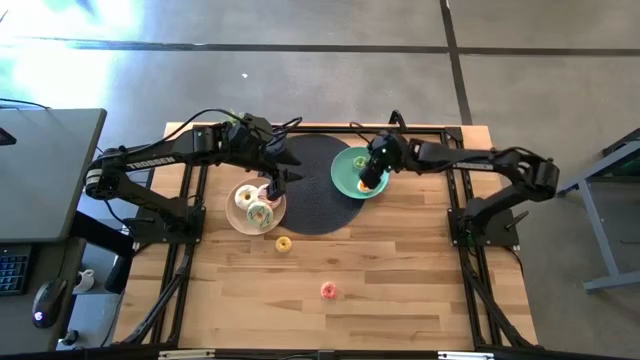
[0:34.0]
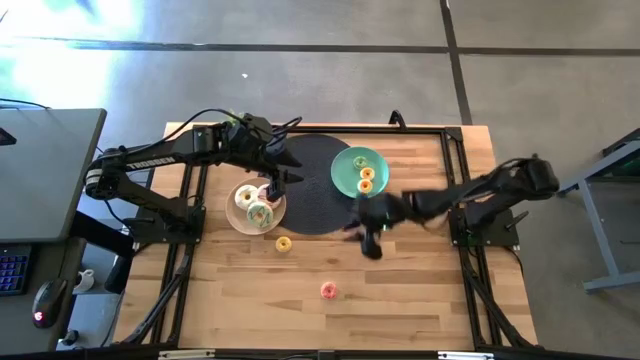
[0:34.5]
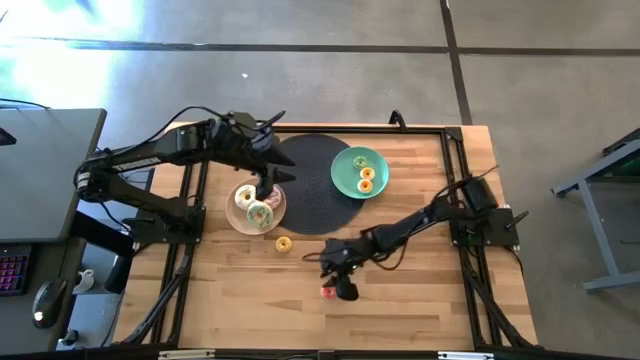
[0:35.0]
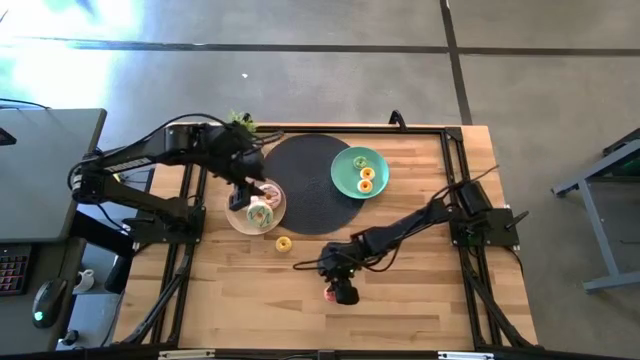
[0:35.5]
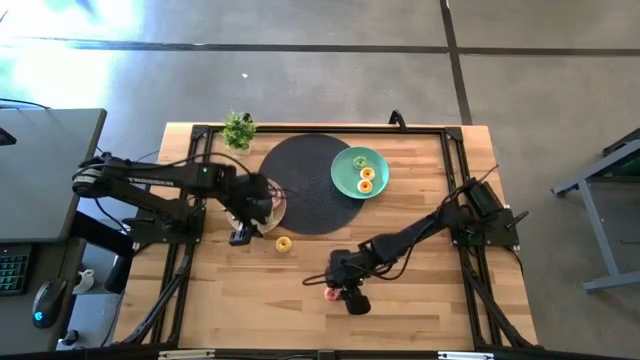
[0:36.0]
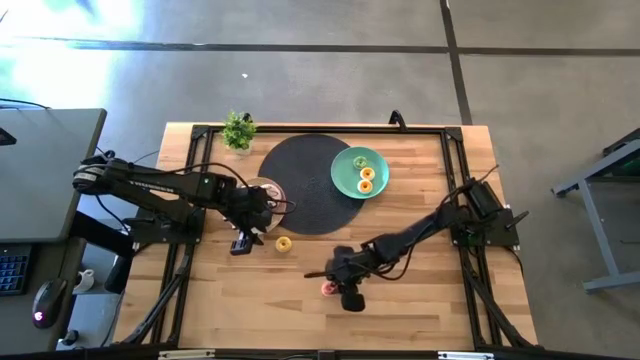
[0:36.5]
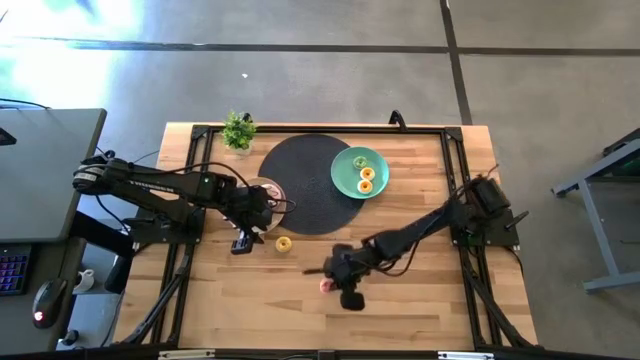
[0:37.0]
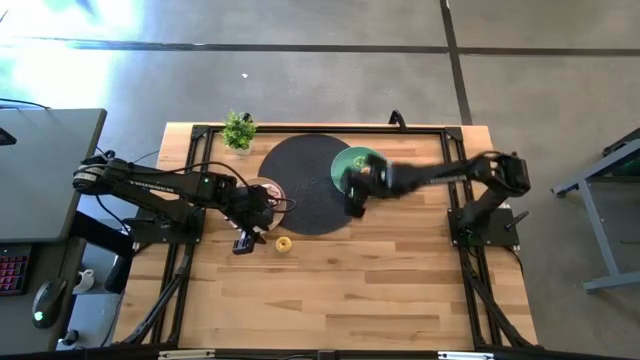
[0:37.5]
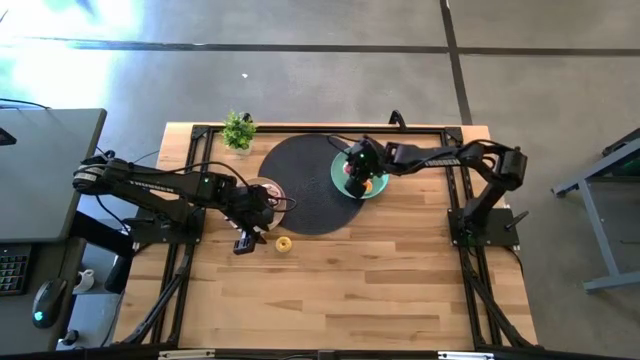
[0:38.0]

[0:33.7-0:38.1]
Task: Pick & Place donuts
Put the small pink donut on the green plate

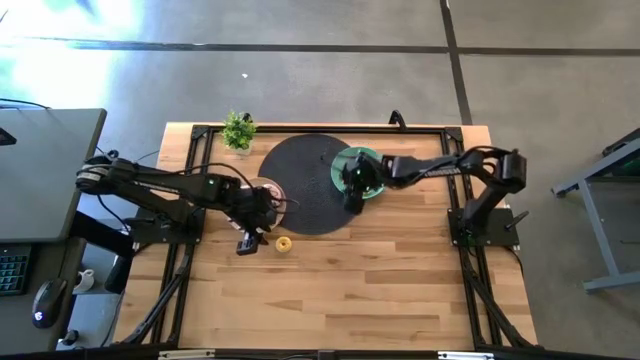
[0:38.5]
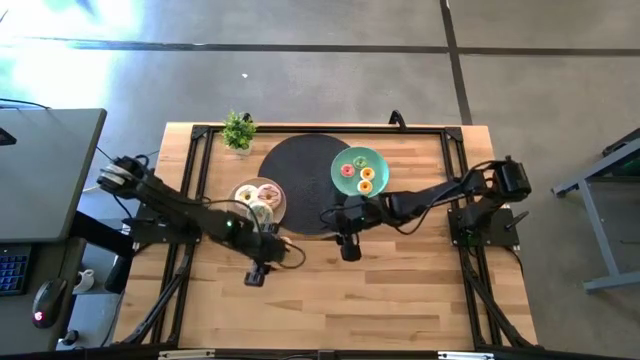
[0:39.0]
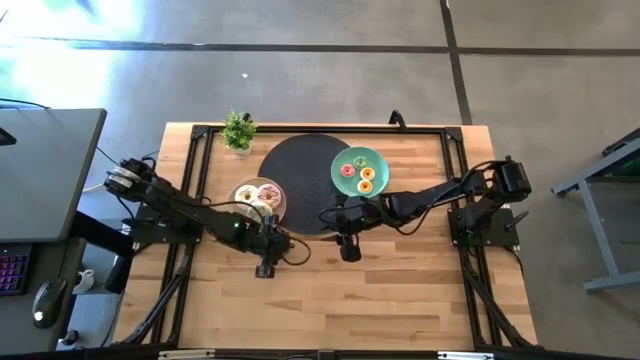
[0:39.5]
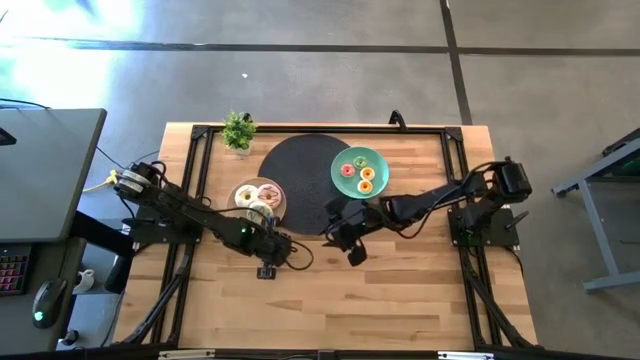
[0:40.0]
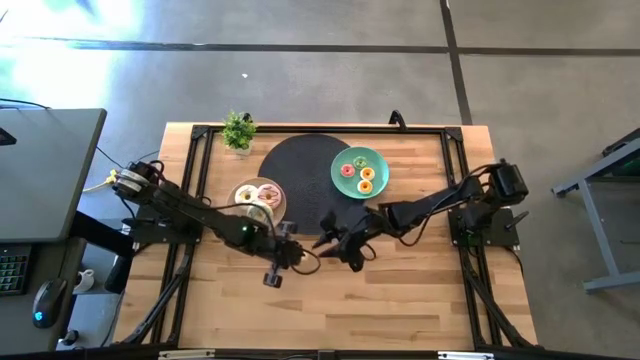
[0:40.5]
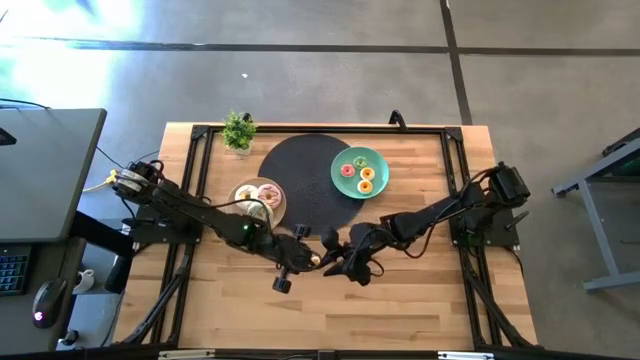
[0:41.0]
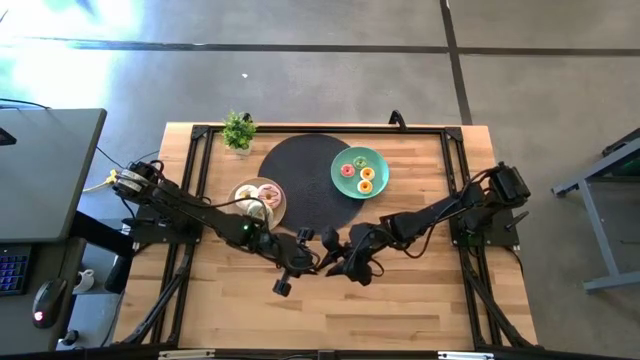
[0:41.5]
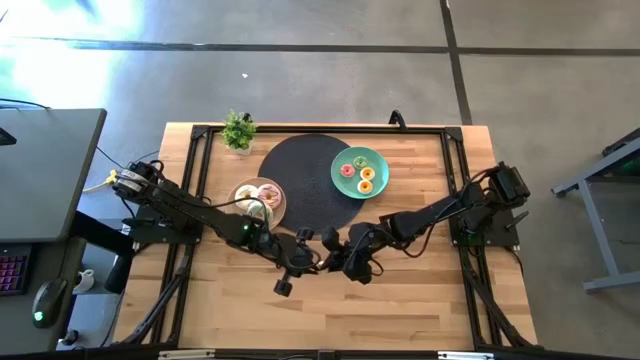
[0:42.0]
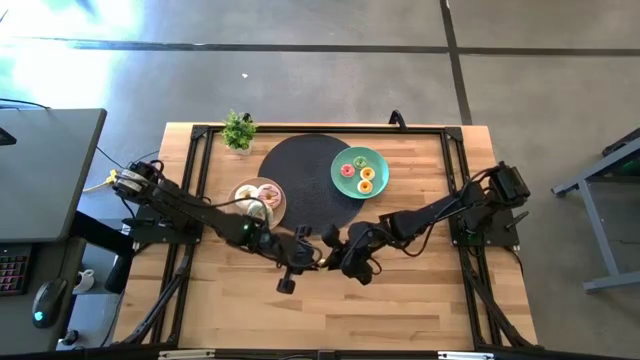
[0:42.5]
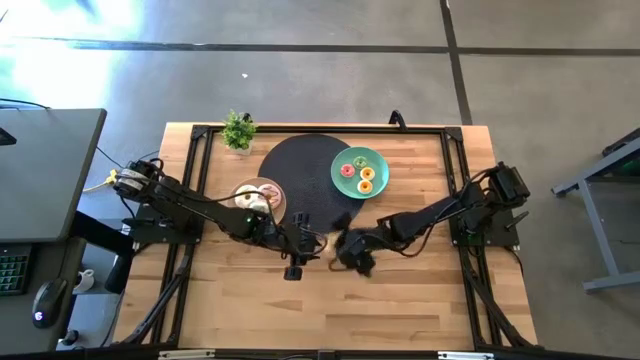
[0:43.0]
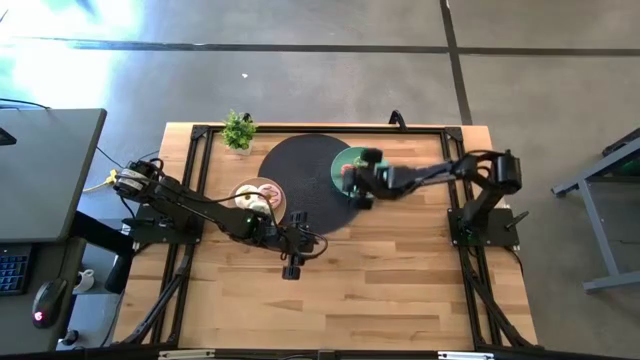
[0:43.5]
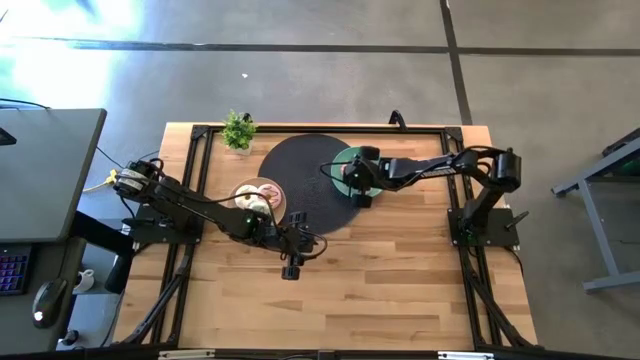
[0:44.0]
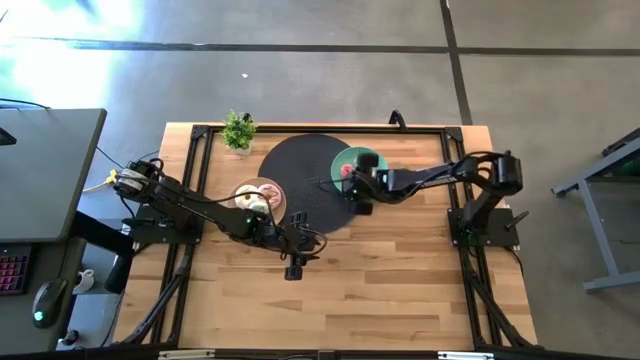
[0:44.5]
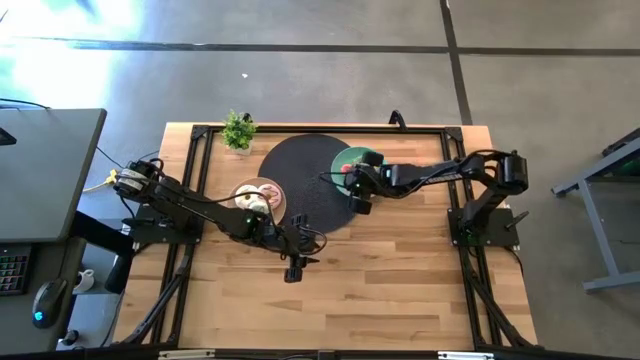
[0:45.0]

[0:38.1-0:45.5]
Put the small yellow donut on the green plate

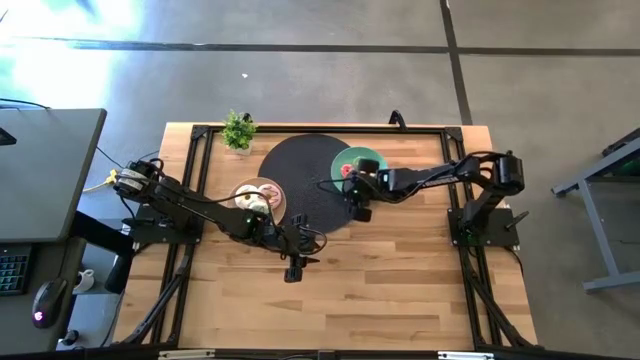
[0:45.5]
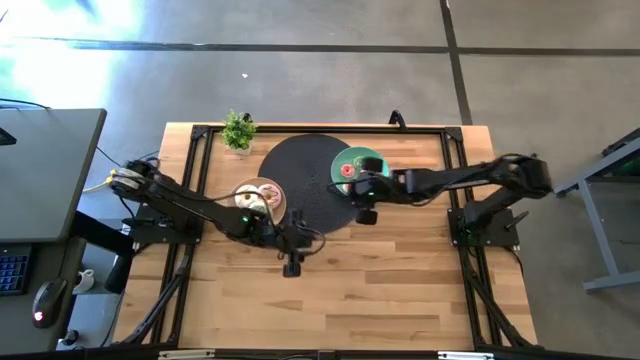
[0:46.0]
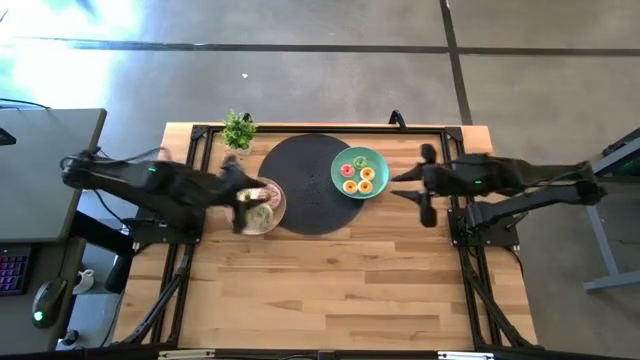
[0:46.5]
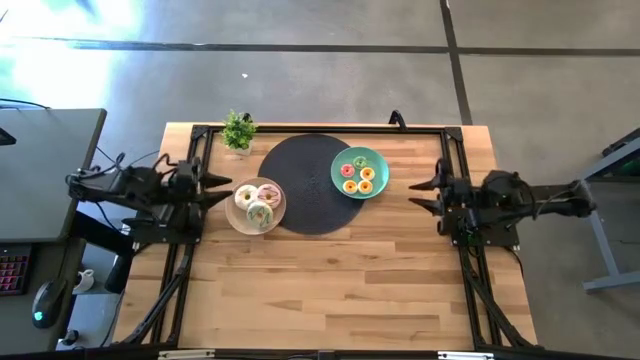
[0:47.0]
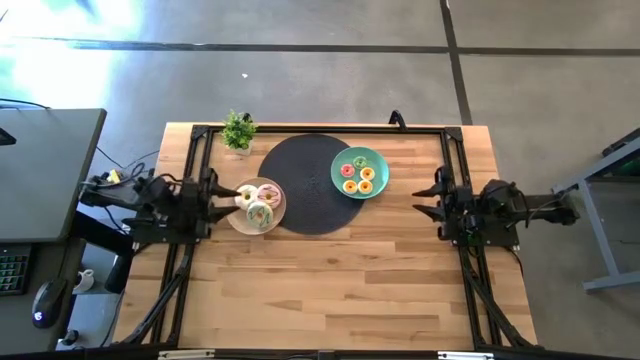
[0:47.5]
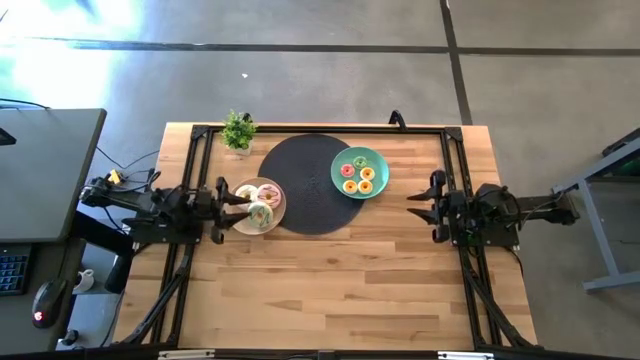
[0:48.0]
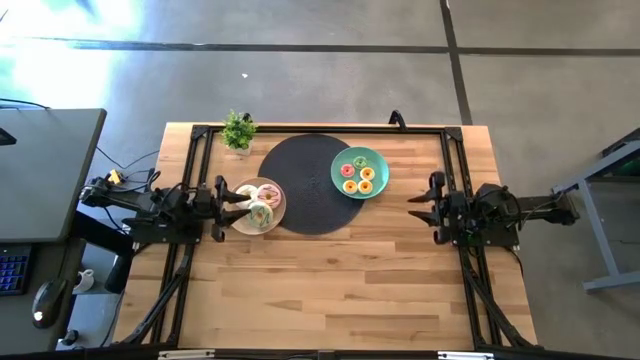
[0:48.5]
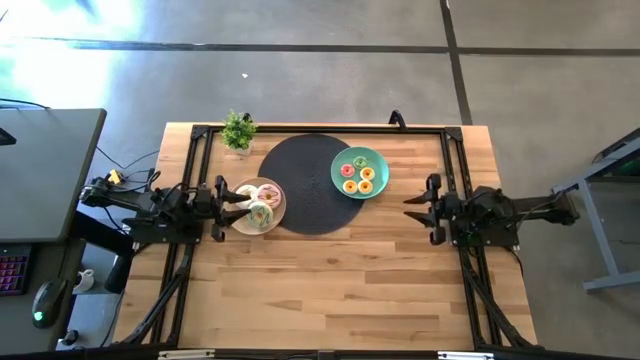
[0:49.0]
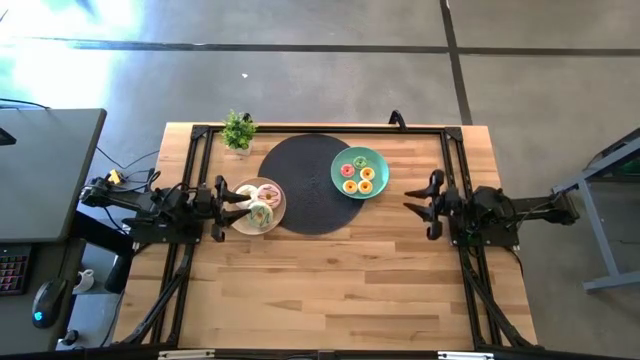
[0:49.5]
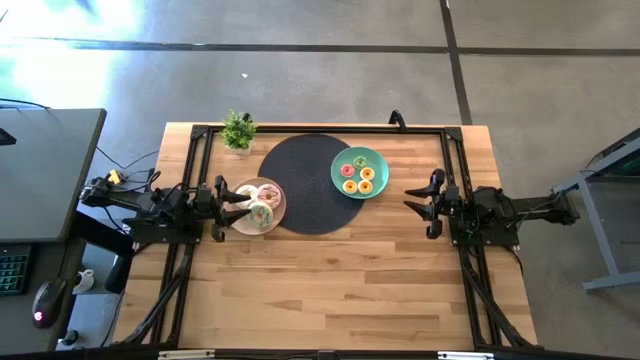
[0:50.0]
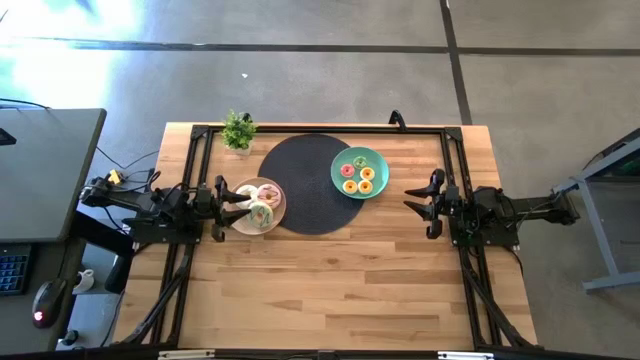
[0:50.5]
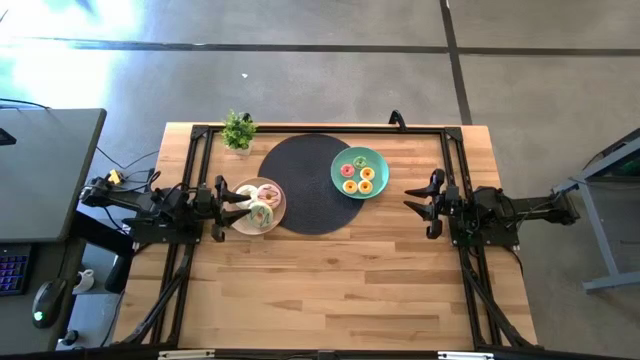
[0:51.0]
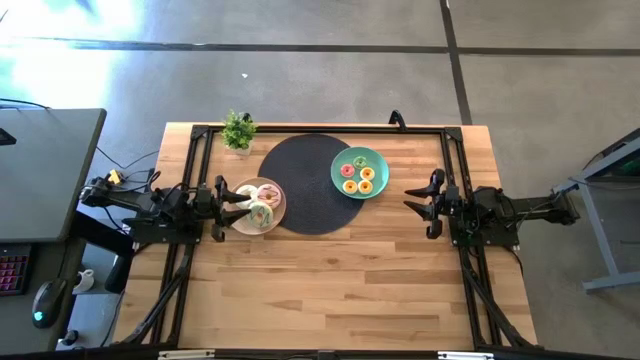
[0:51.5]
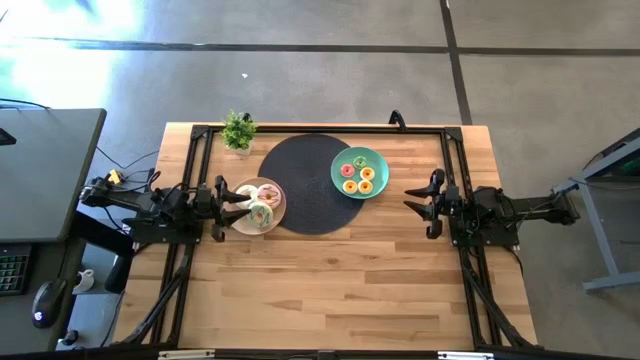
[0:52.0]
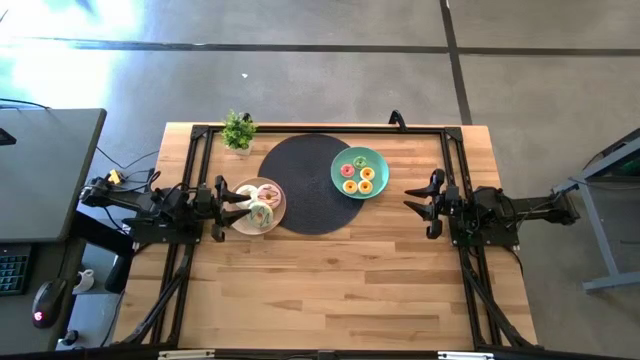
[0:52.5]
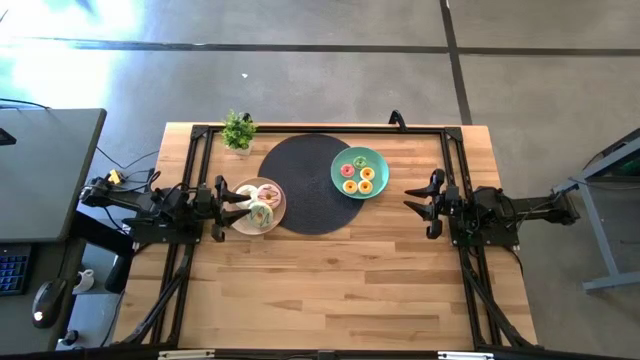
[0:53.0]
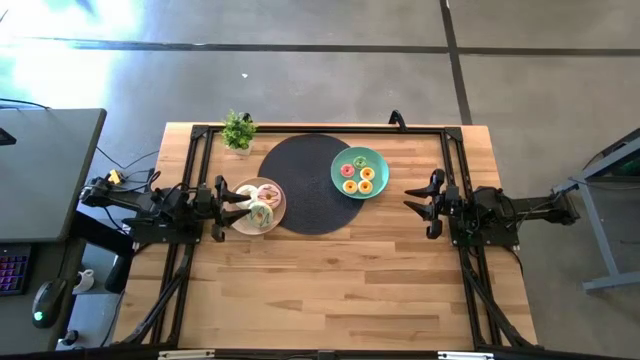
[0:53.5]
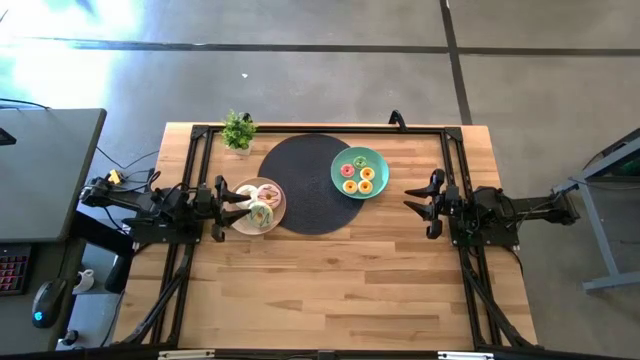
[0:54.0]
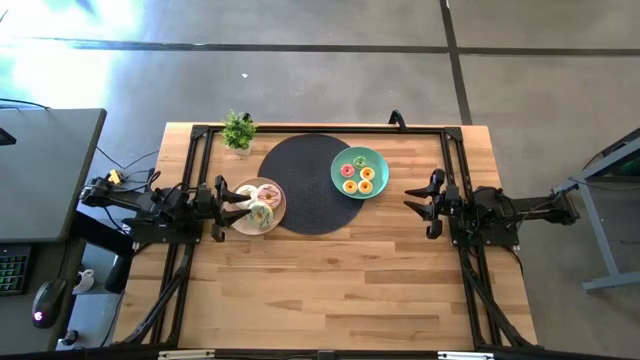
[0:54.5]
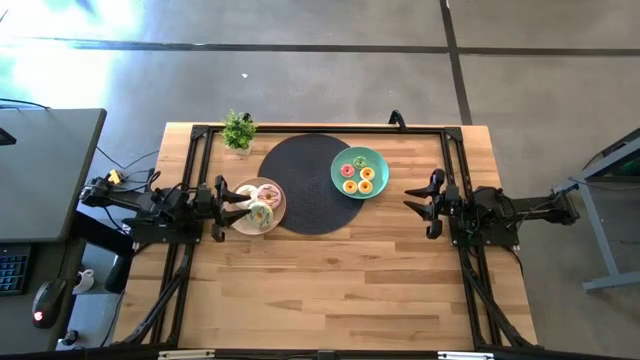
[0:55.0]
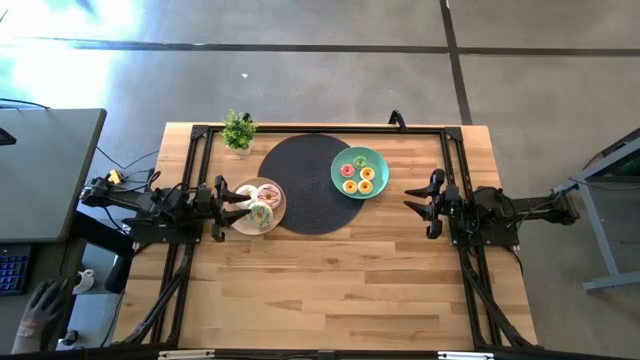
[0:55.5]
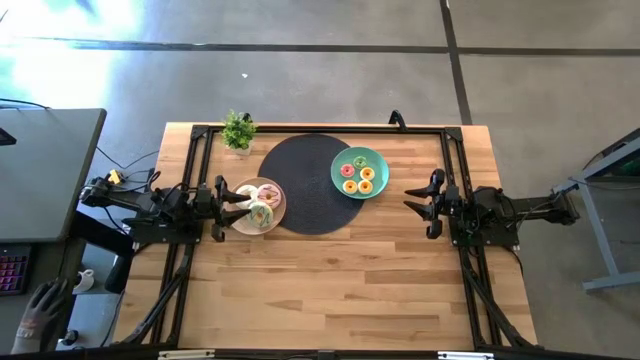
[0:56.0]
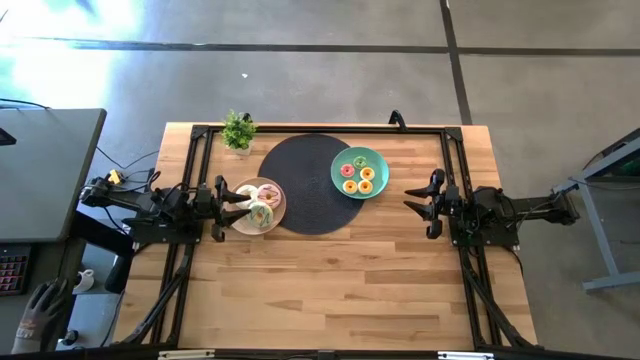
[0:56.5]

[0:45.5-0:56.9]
Return to Home Position
